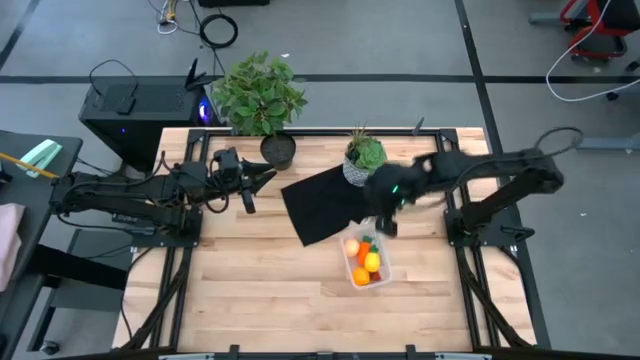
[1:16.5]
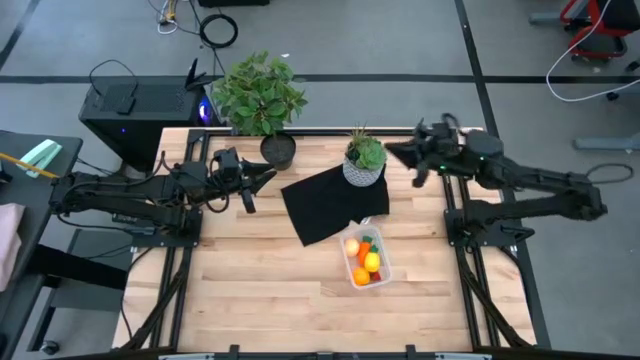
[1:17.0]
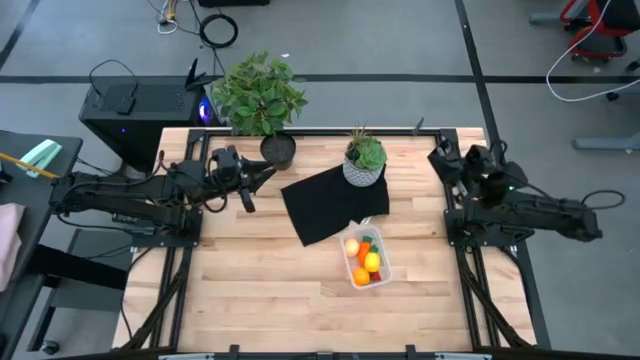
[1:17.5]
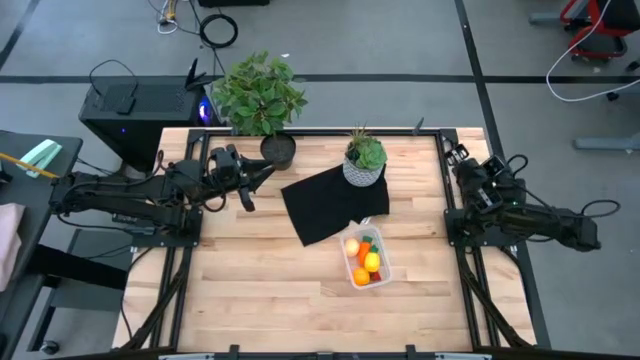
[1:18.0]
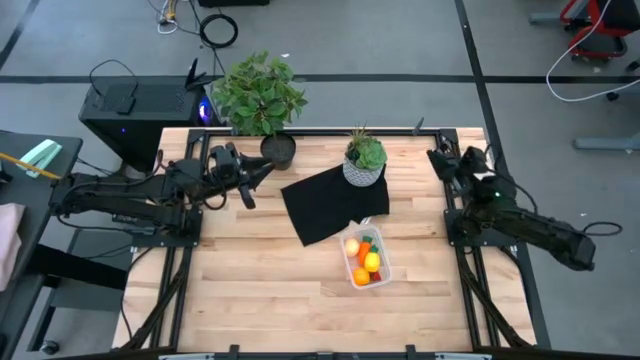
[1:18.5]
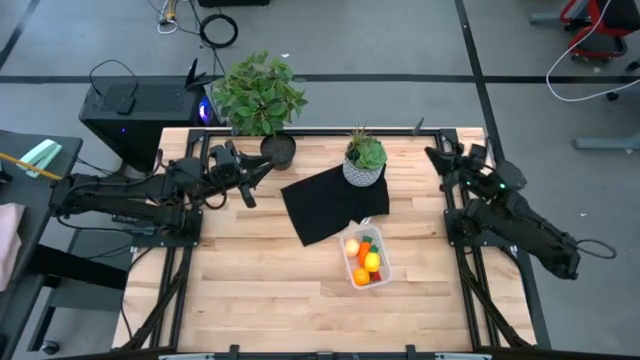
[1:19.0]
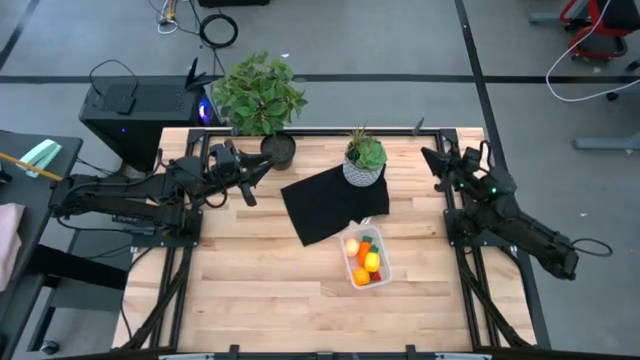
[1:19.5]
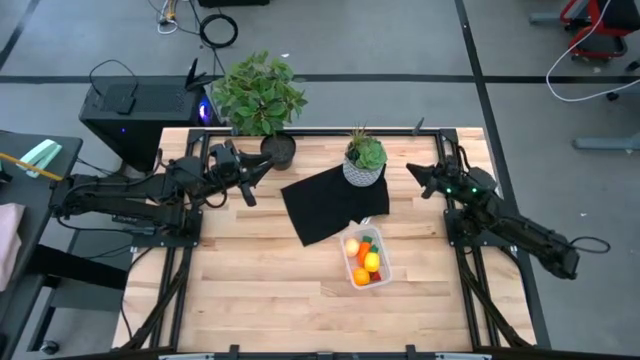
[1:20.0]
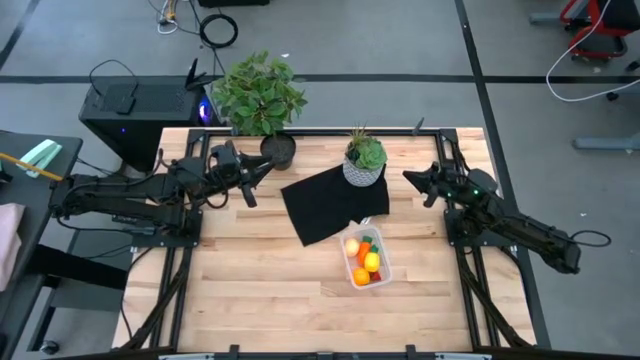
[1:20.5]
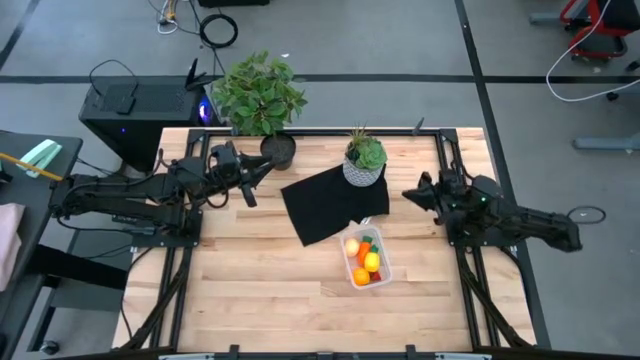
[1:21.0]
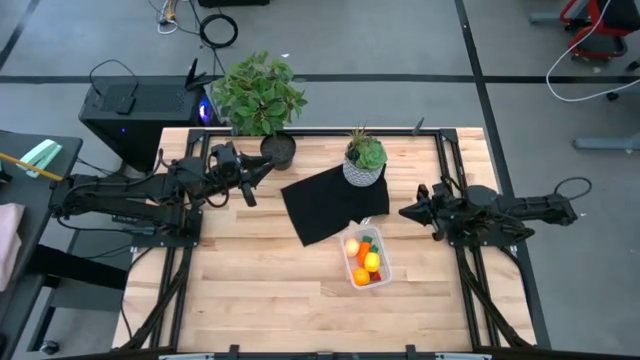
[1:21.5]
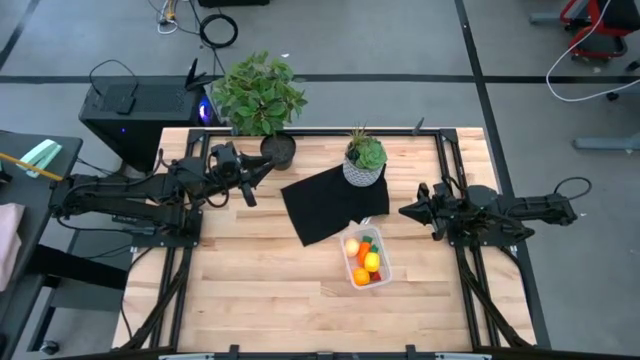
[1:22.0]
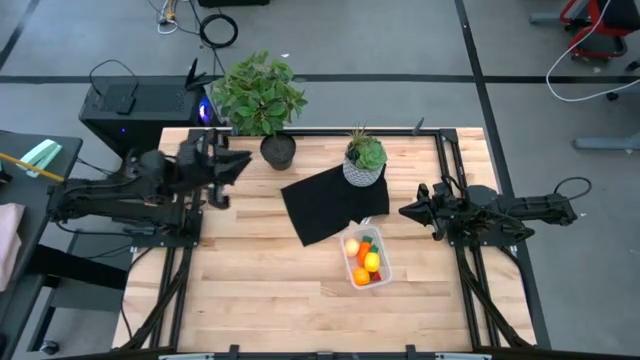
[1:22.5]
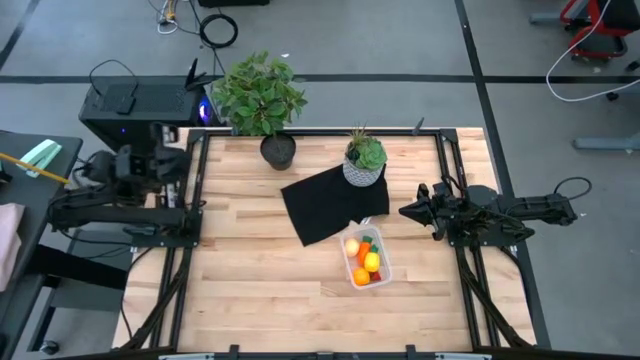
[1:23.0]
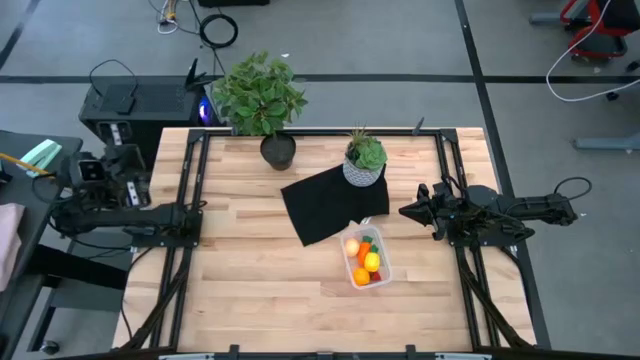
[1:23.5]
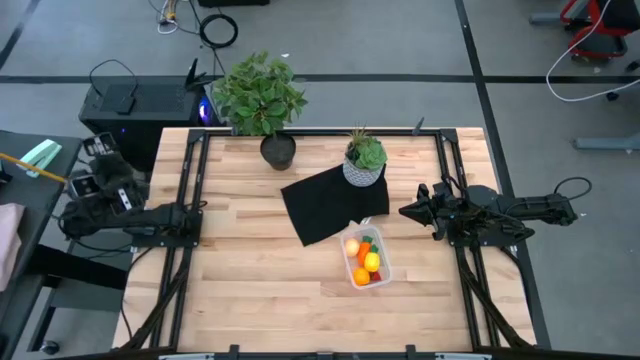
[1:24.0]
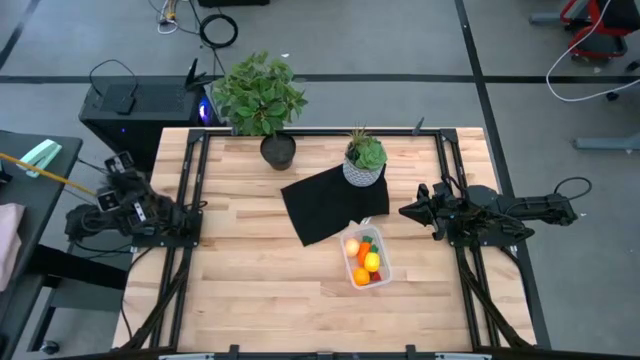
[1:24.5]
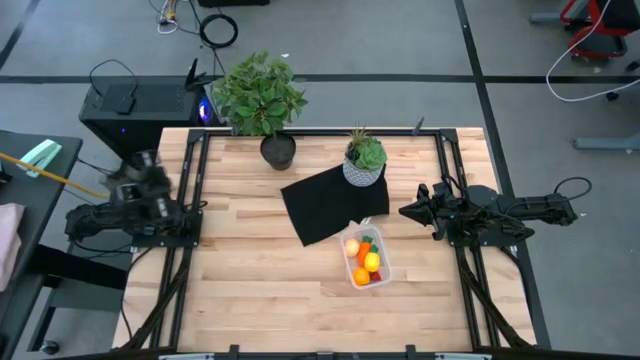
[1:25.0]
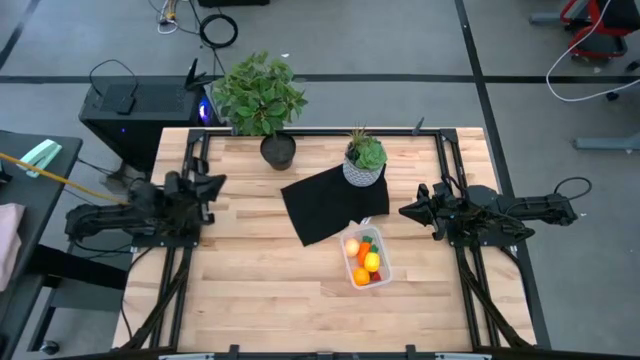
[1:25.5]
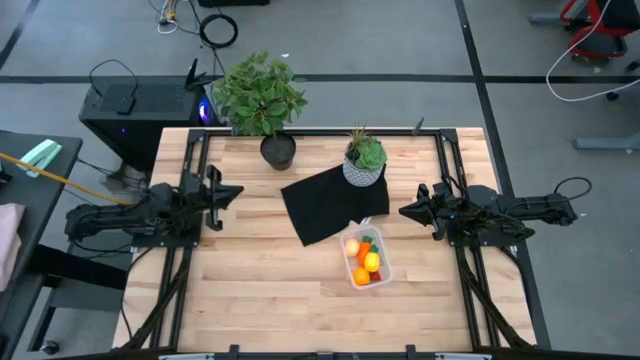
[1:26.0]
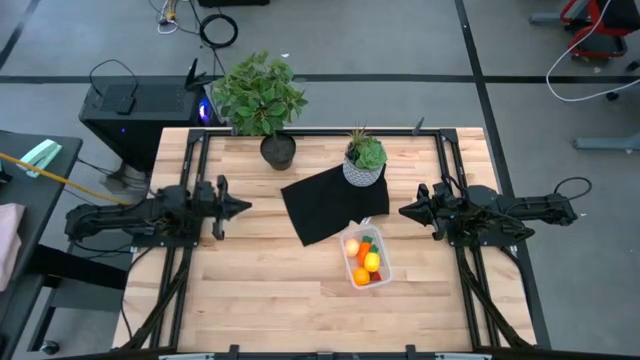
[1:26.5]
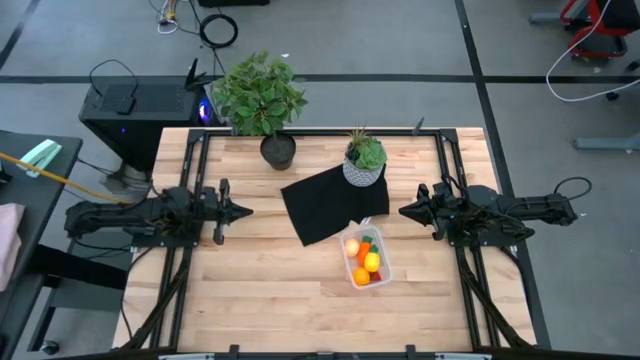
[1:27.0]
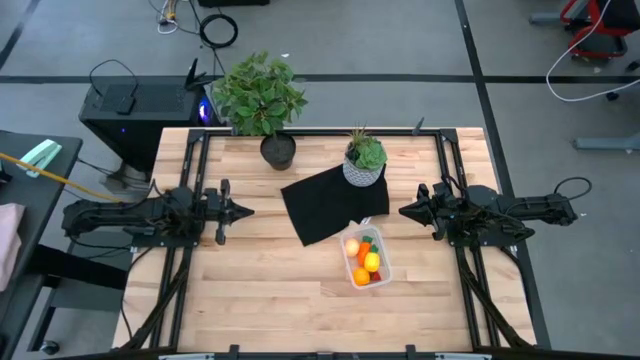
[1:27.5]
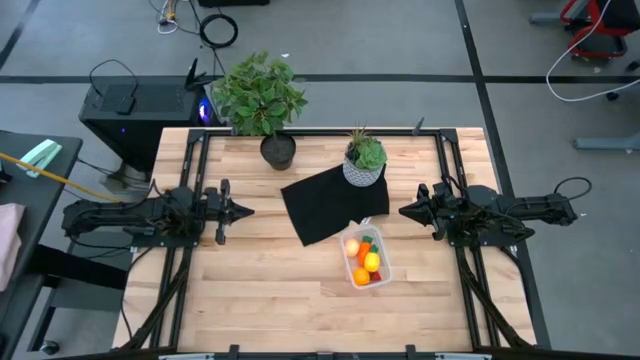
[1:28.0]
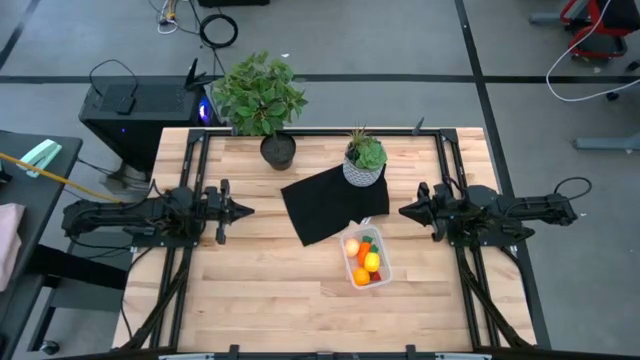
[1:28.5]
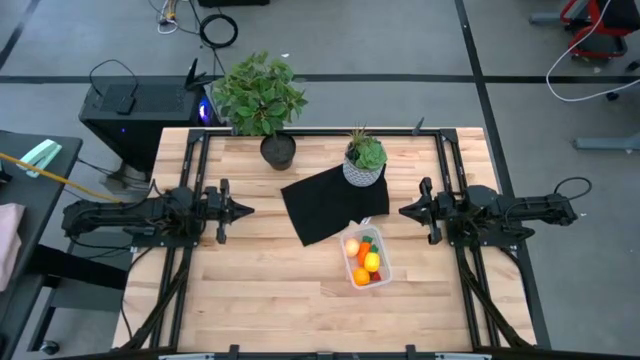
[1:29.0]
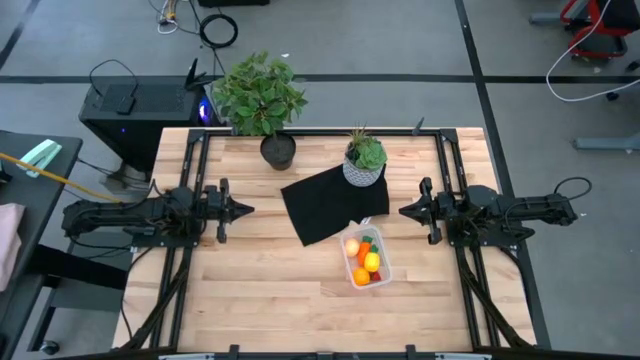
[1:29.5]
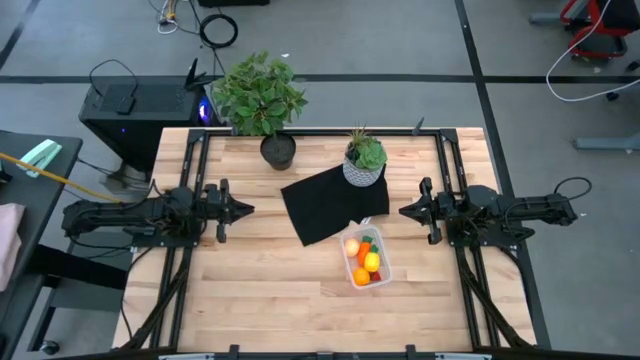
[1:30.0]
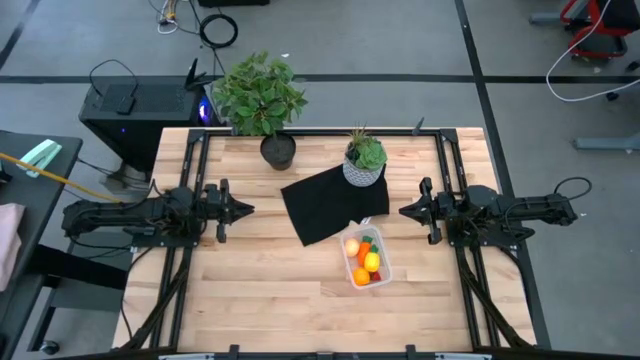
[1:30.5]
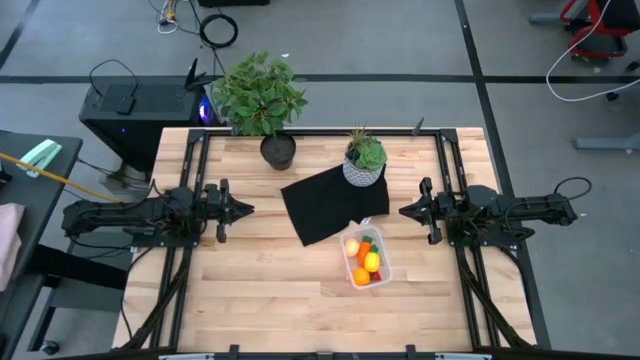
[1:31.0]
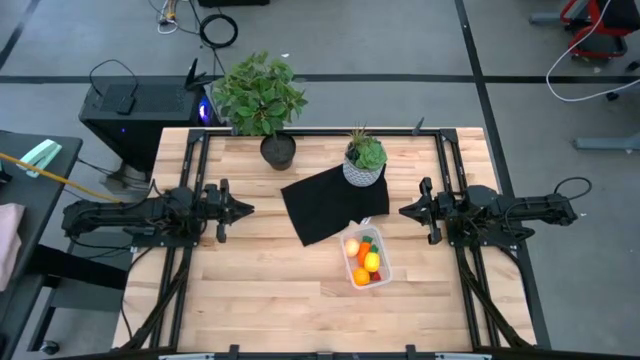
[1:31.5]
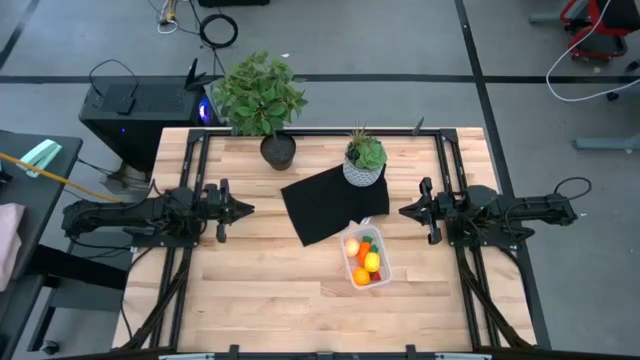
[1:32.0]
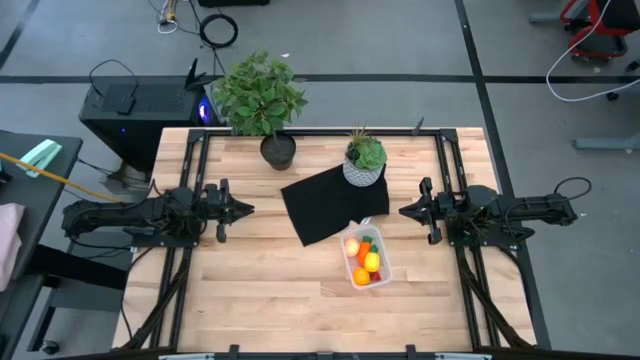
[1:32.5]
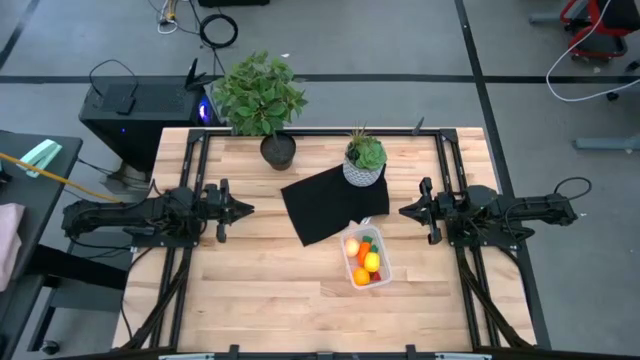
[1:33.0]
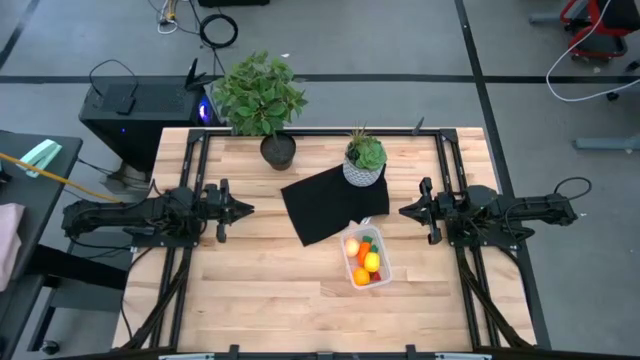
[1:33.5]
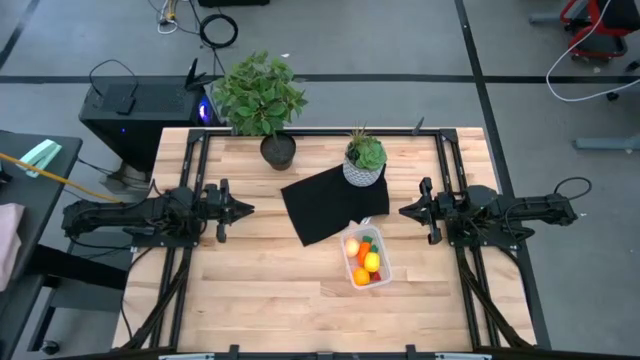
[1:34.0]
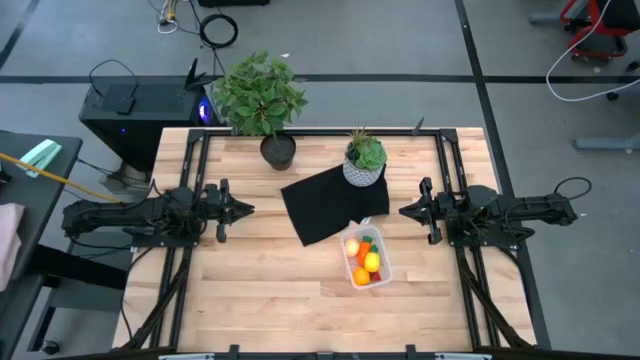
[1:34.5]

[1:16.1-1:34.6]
Task: Pick and placing Produce into tupperware
Return to Home Position

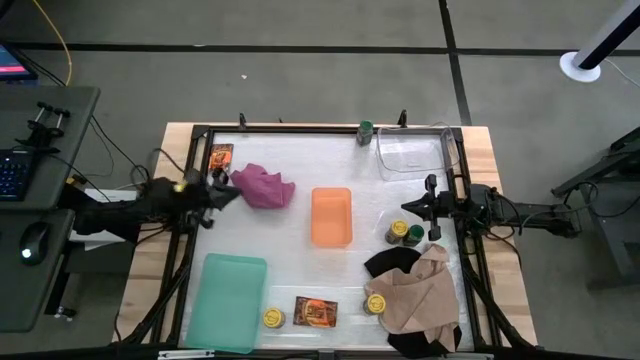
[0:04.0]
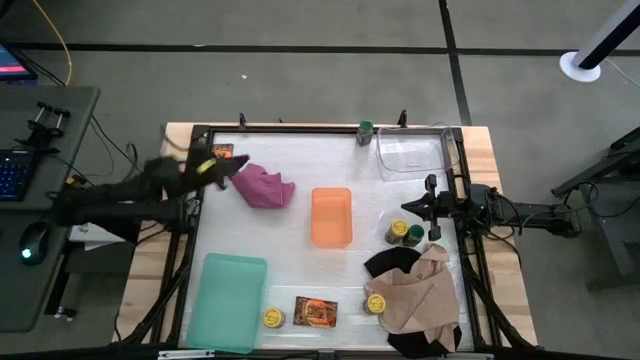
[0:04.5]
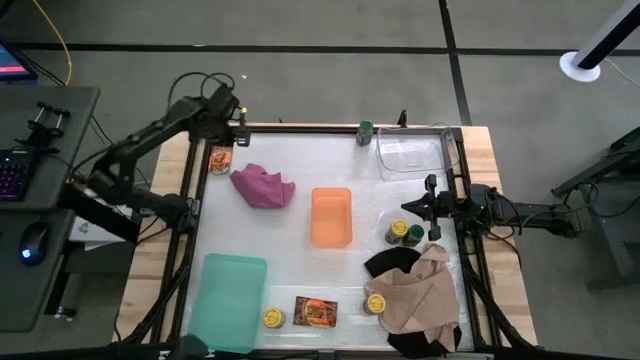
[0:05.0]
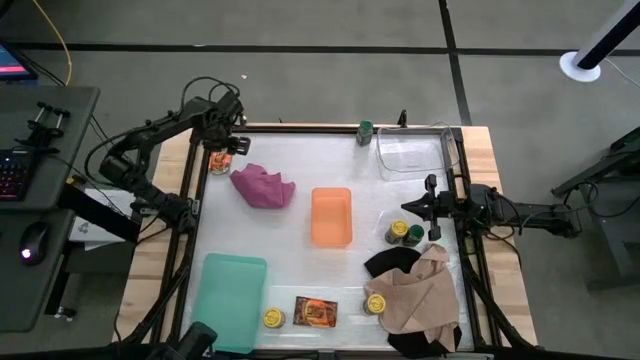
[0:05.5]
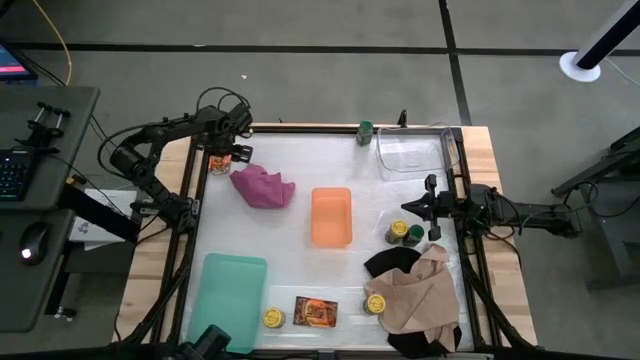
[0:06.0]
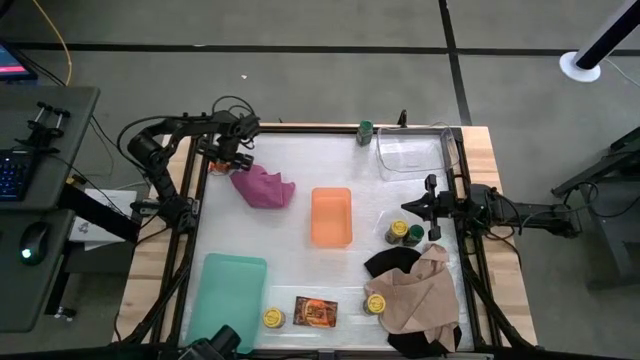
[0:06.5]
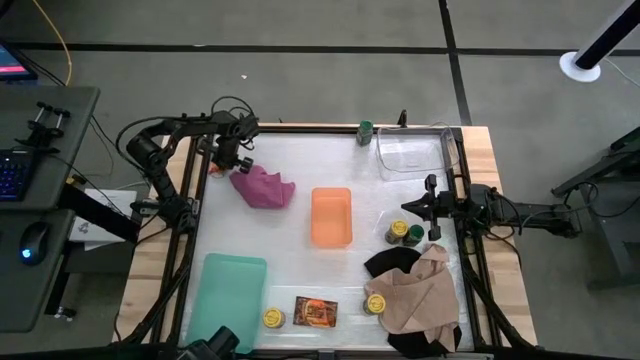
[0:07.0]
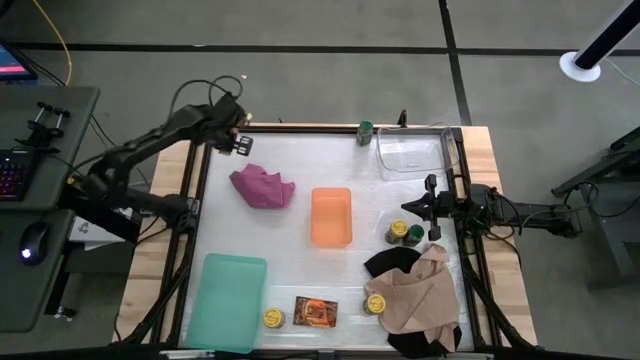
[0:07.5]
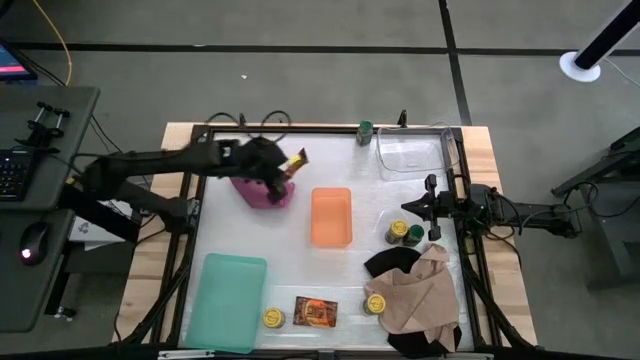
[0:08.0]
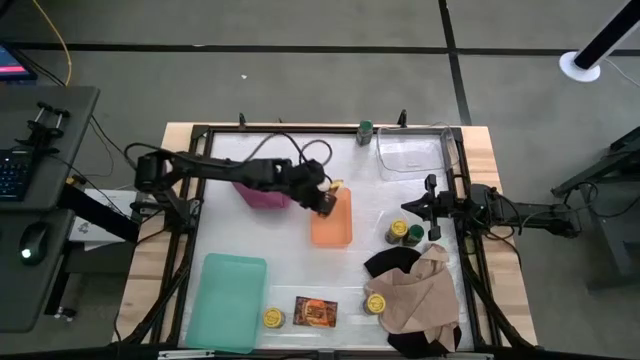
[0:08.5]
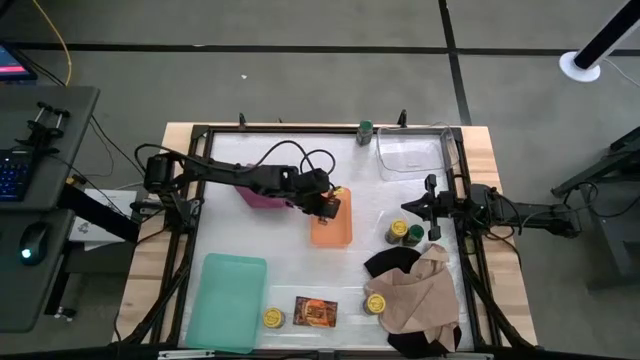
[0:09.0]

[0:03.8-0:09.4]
Task: Sort spices by type
Put the top orange seasoning sachet into the orange bin
